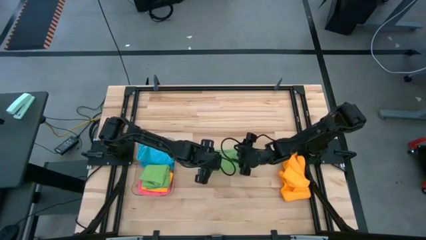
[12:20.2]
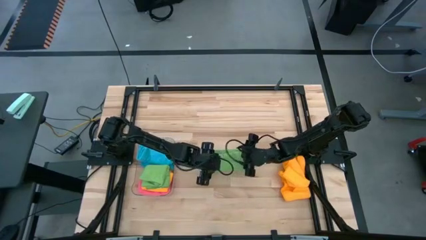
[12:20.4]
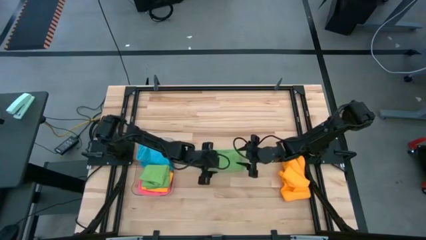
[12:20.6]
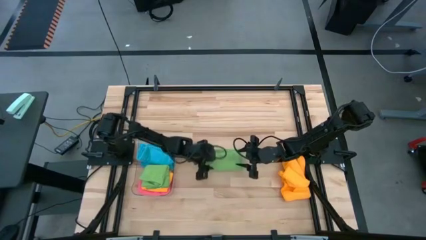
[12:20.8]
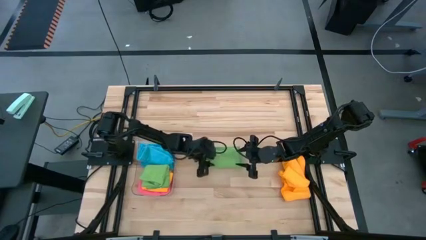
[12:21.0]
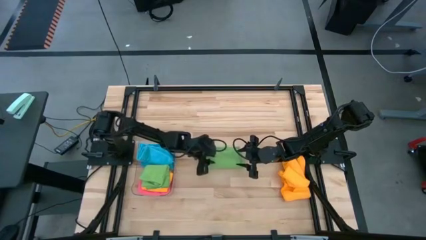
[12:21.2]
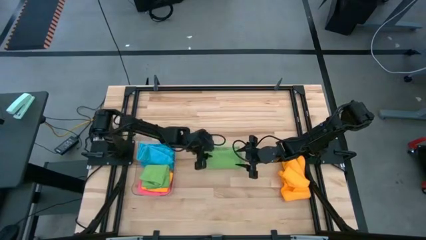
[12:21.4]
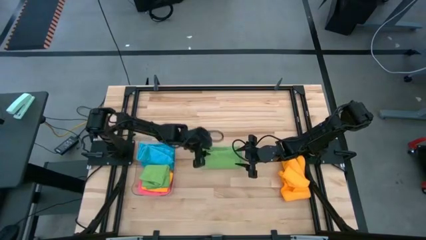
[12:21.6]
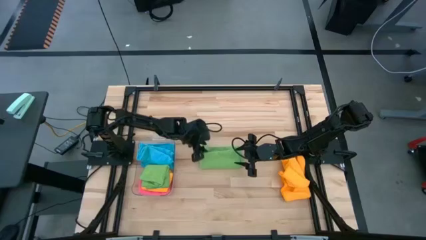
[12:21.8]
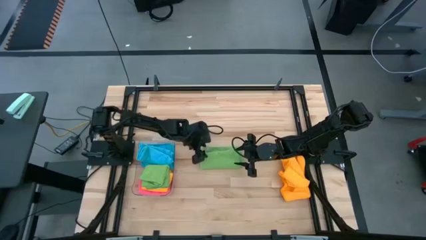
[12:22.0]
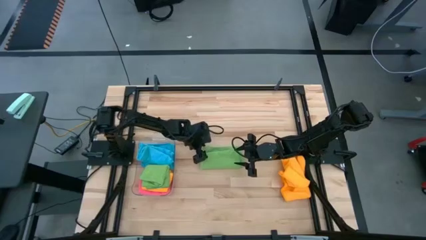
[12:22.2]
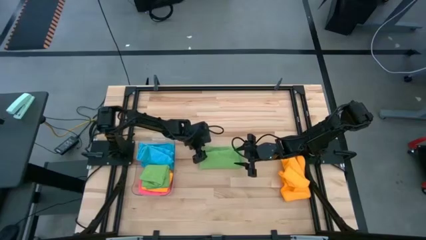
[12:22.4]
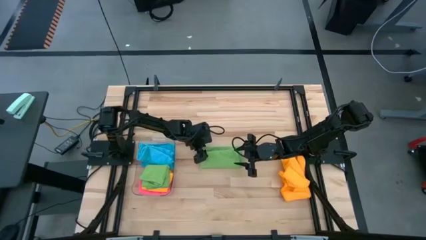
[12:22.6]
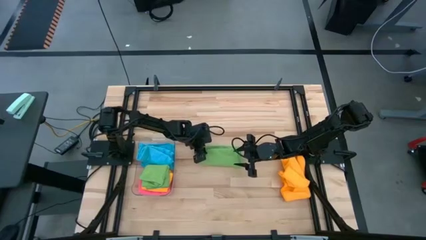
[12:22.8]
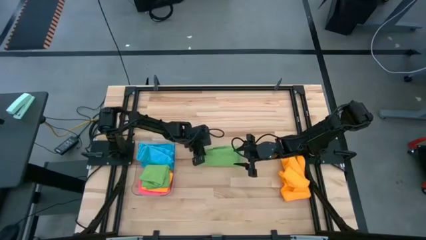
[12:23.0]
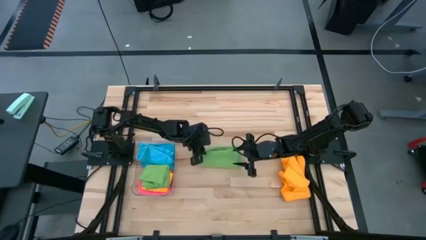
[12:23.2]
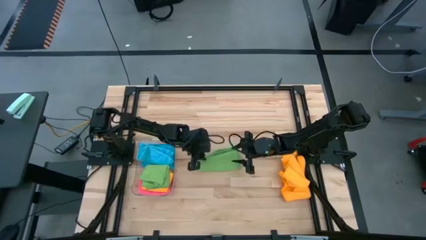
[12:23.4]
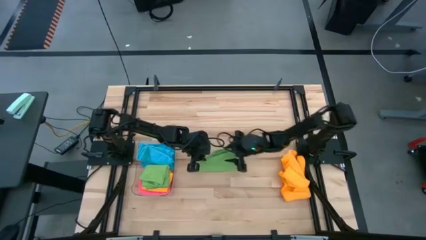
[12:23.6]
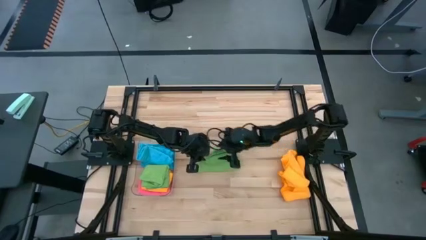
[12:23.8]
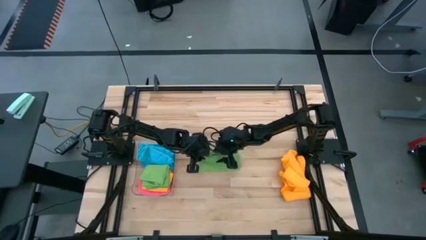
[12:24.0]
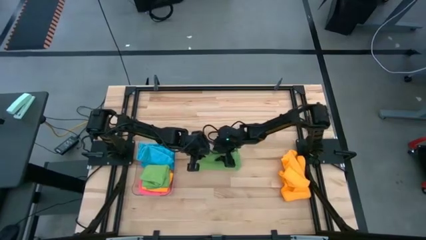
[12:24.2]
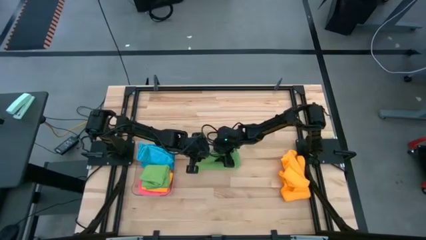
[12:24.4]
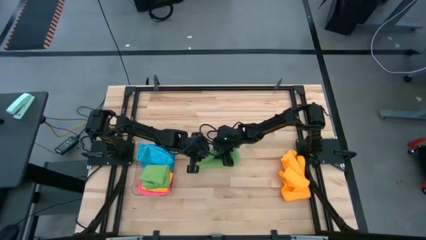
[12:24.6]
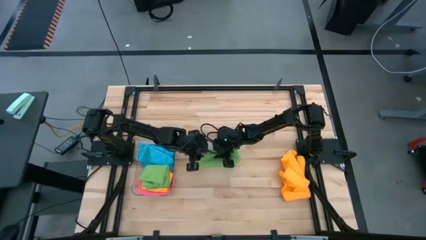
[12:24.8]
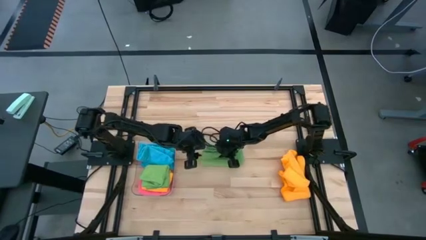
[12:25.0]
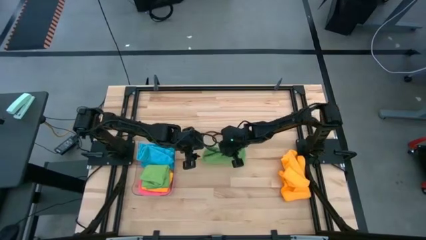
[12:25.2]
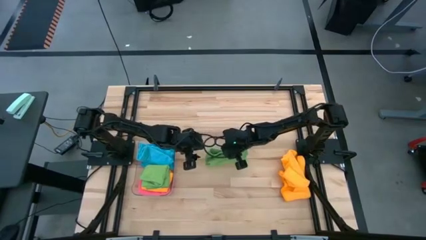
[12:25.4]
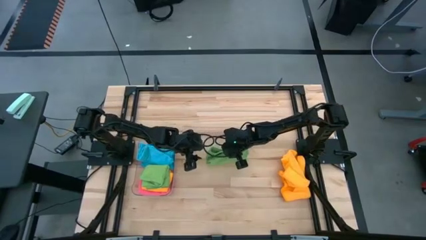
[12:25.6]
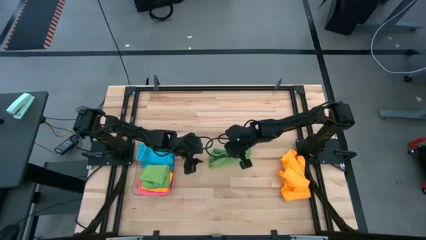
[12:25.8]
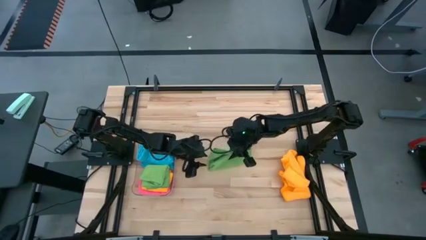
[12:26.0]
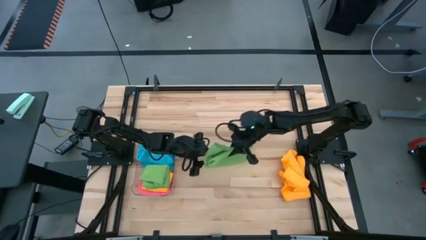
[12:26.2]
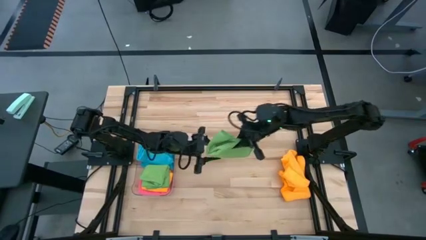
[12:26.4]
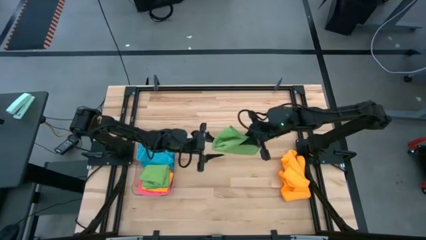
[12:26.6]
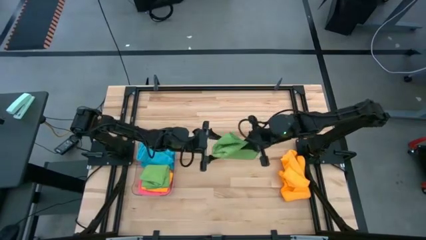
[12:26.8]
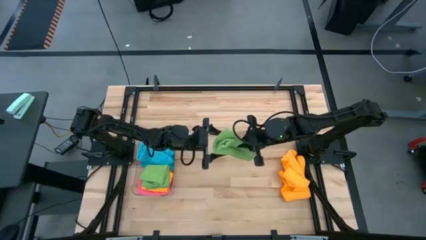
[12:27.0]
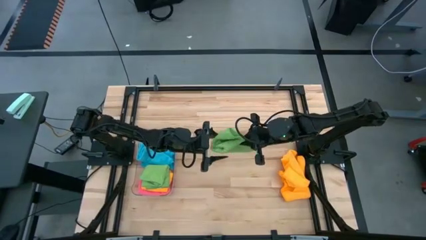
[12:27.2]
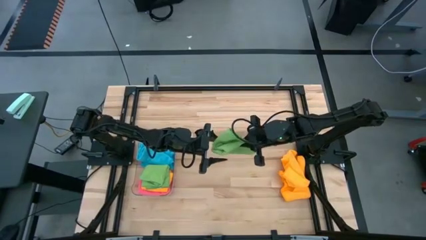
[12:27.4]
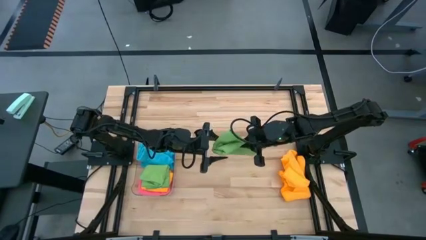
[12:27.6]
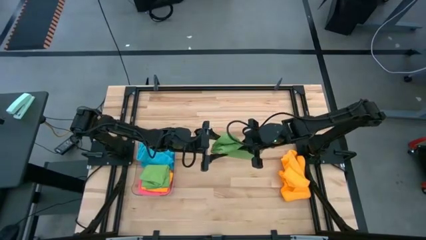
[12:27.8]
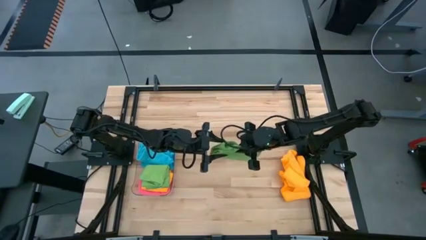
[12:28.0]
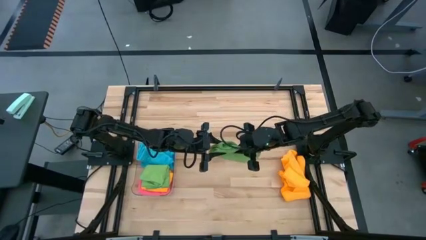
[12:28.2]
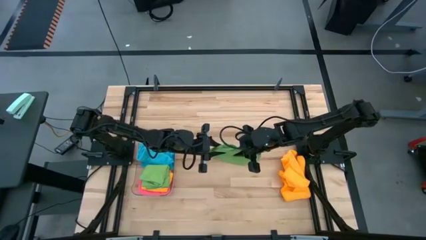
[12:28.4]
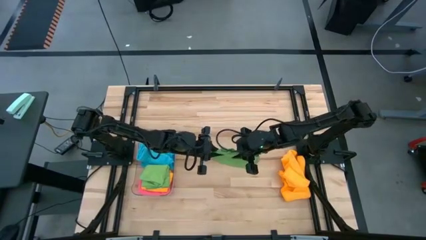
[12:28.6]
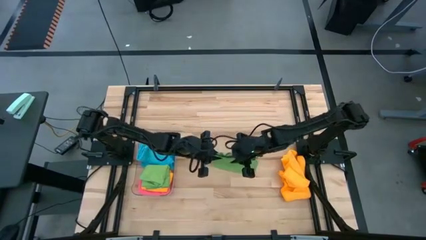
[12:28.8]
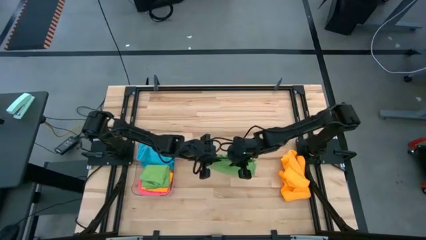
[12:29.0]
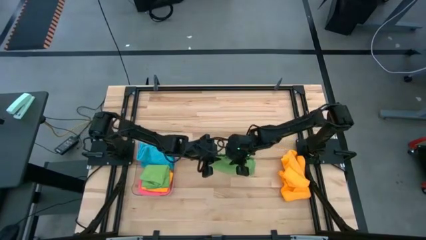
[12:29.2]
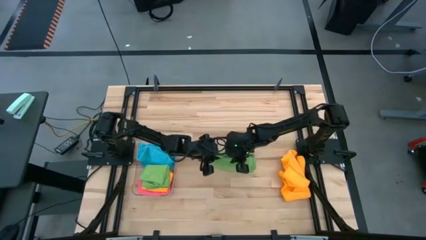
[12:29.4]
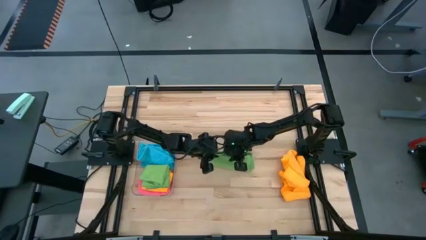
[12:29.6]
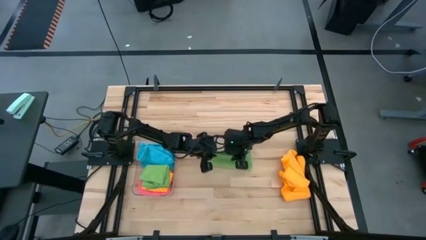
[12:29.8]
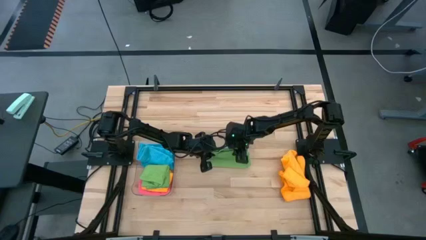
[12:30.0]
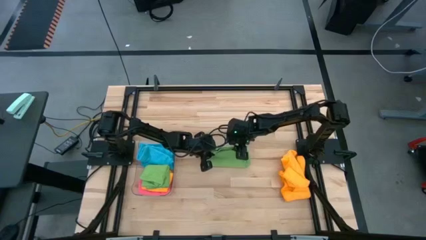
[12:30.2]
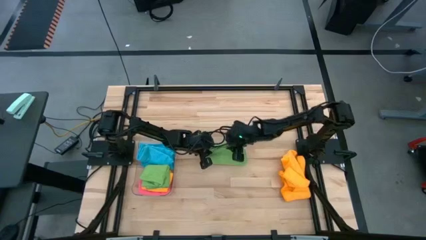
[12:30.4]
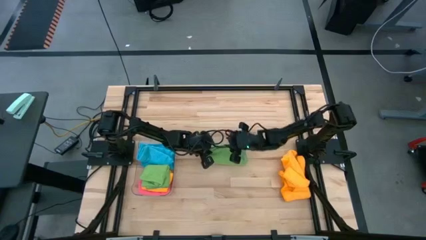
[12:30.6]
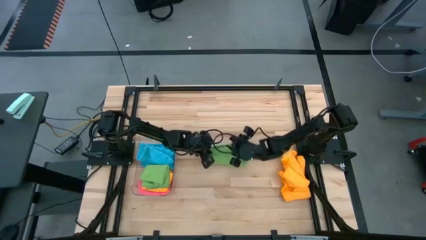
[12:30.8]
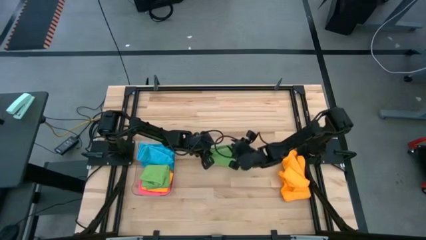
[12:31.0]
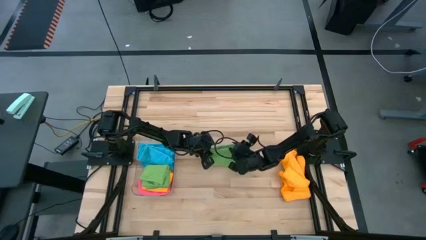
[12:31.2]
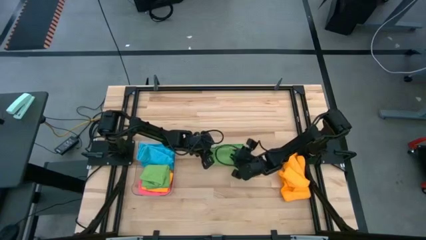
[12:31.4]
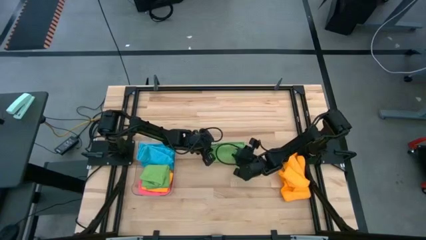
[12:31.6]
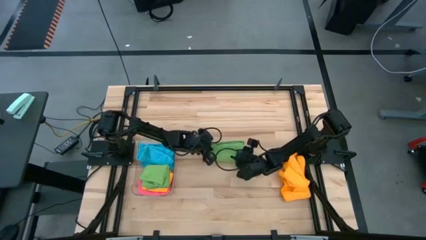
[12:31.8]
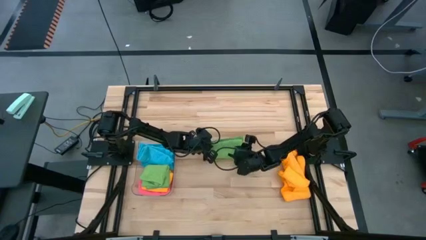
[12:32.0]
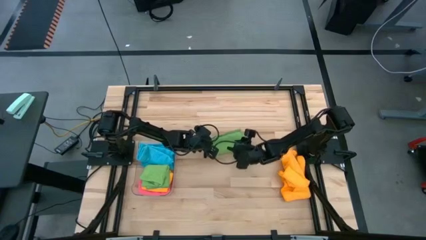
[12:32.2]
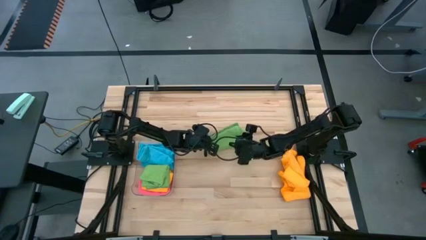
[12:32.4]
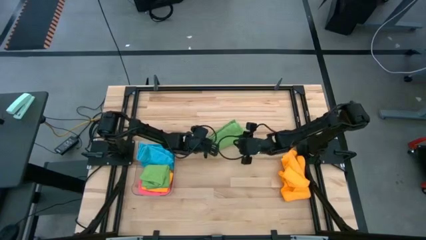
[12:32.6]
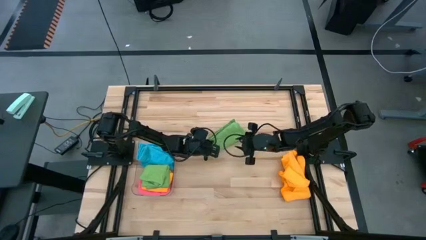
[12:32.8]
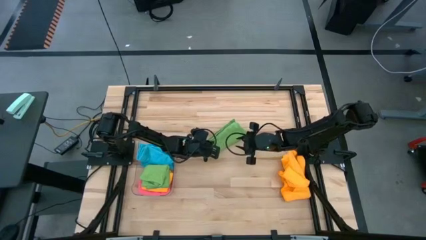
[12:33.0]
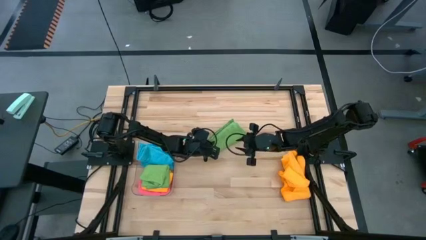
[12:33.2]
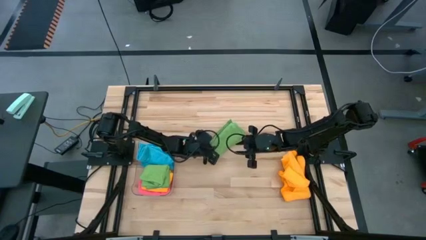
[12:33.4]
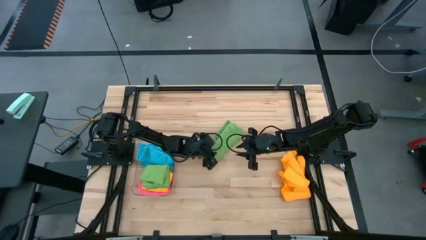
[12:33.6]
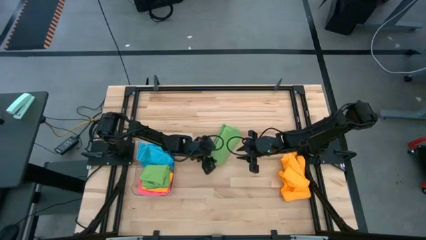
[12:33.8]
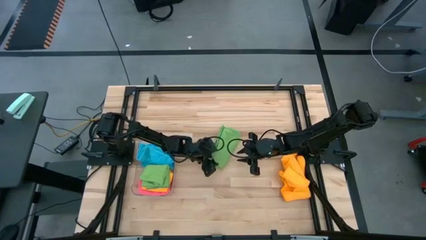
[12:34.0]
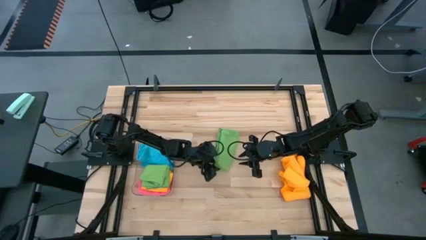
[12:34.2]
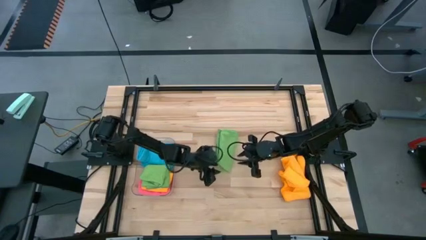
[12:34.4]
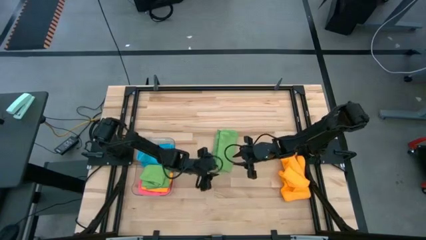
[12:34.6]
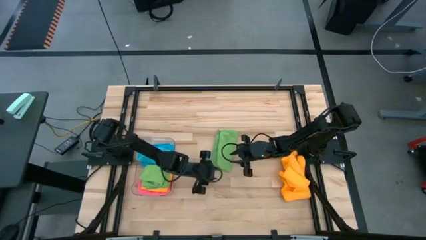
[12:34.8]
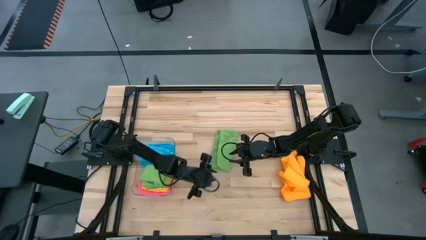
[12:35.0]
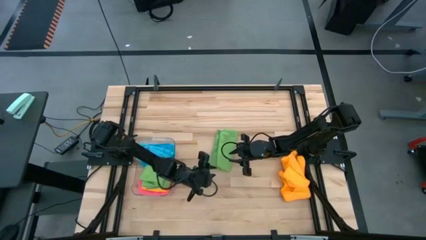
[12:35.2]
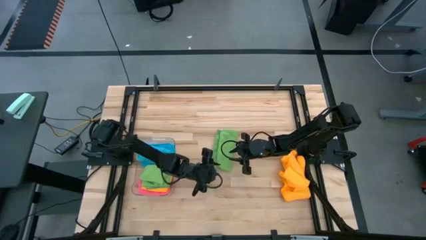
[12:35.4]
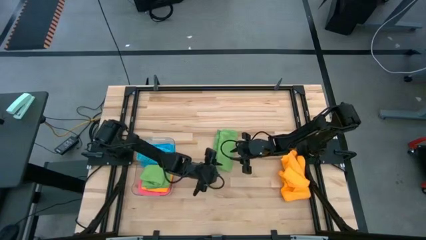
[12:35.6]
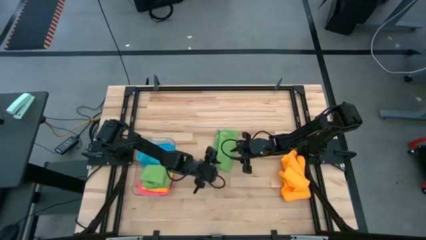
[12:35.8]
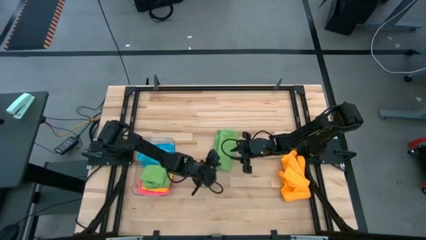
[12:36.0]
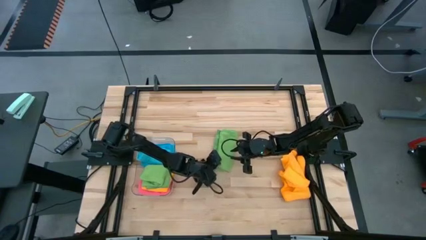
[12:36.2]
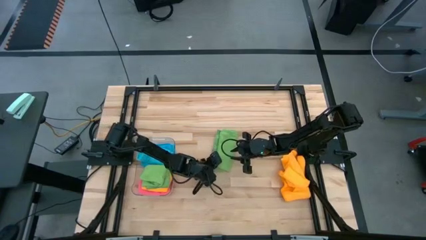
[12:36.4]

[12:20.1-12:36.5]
Task: Fold microfiber towels
Fold the green microfiber cloth
